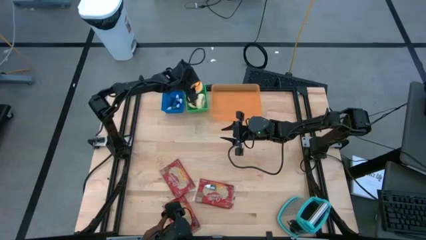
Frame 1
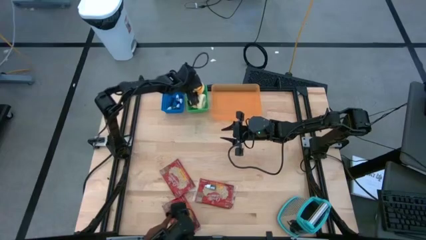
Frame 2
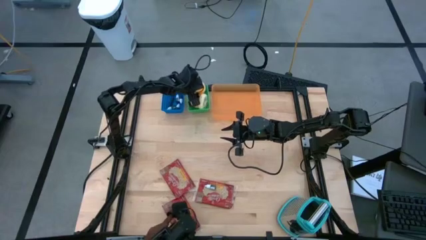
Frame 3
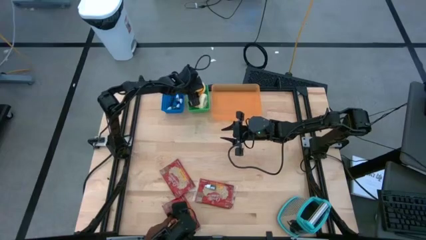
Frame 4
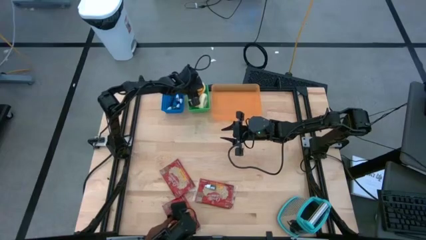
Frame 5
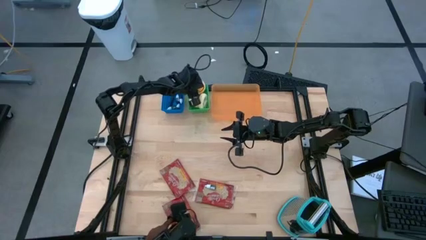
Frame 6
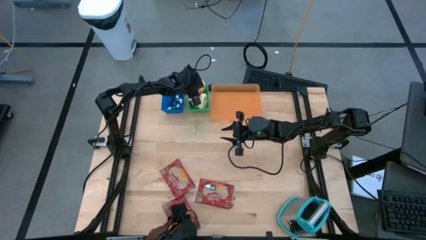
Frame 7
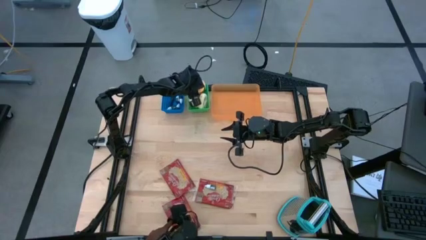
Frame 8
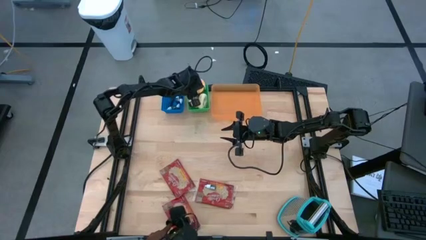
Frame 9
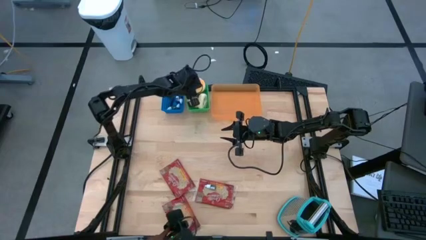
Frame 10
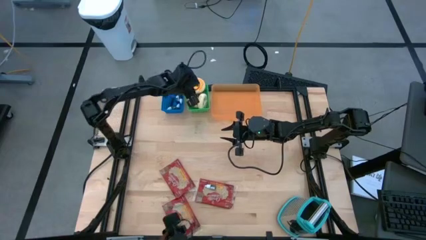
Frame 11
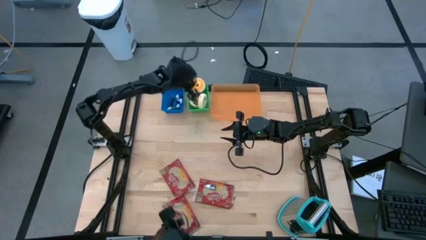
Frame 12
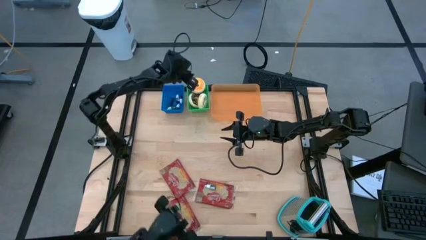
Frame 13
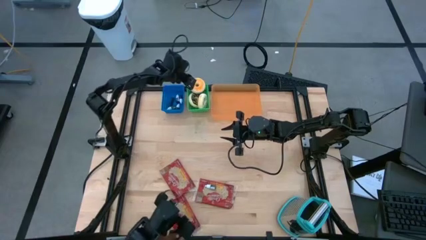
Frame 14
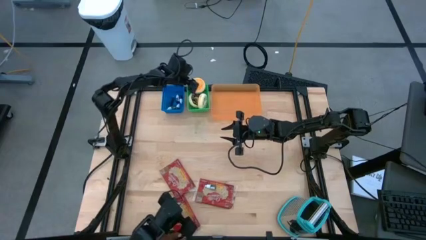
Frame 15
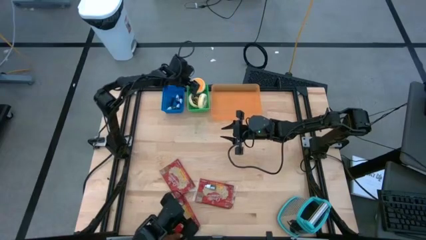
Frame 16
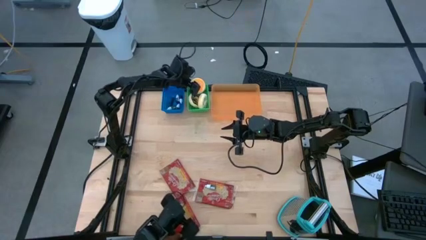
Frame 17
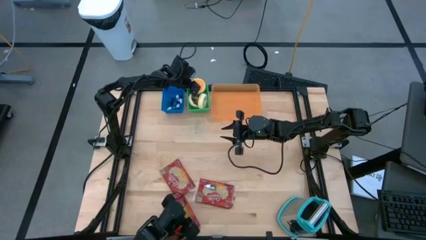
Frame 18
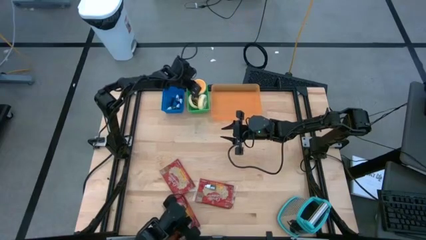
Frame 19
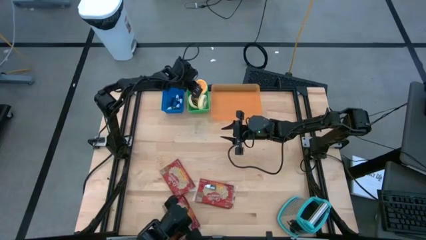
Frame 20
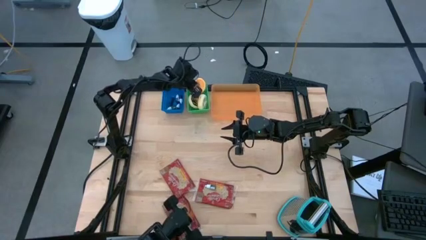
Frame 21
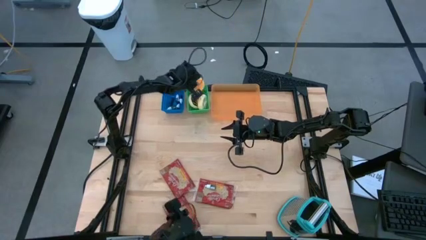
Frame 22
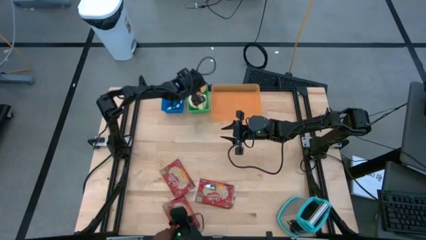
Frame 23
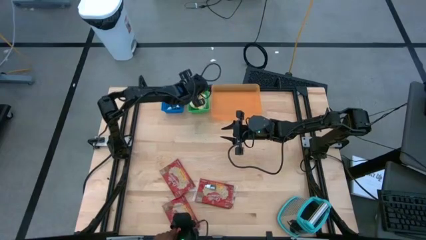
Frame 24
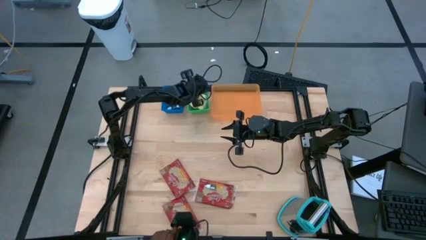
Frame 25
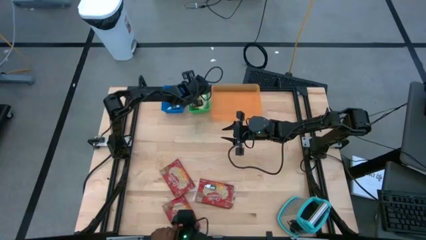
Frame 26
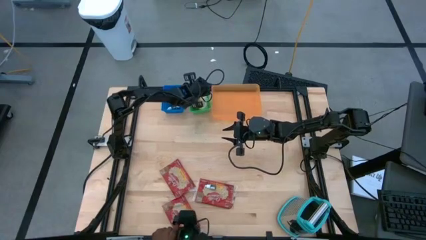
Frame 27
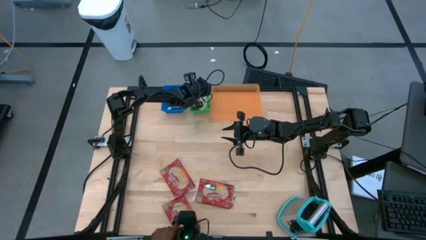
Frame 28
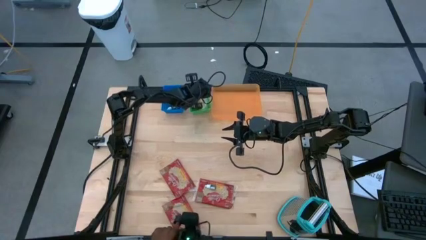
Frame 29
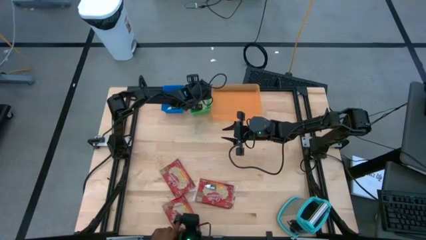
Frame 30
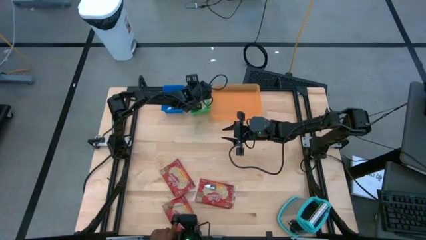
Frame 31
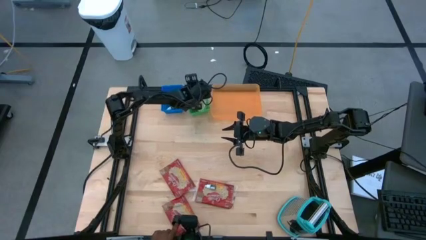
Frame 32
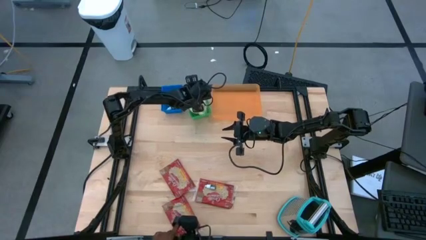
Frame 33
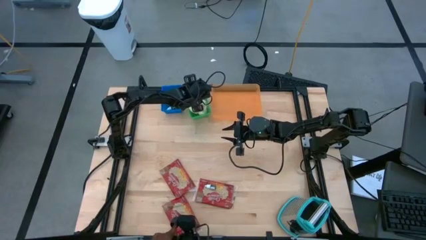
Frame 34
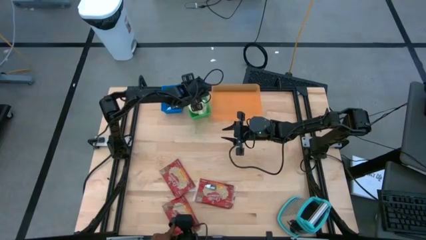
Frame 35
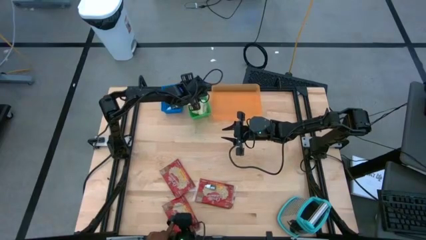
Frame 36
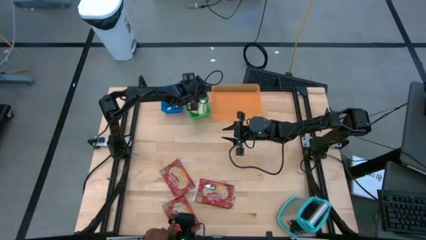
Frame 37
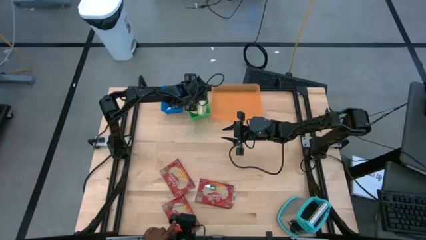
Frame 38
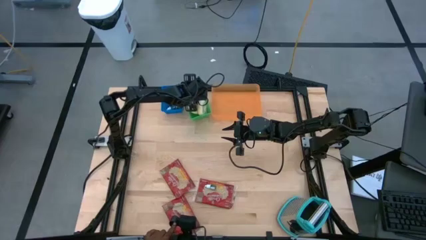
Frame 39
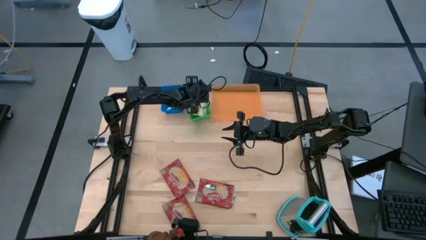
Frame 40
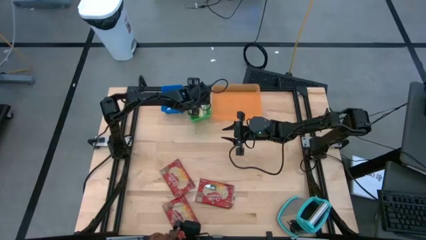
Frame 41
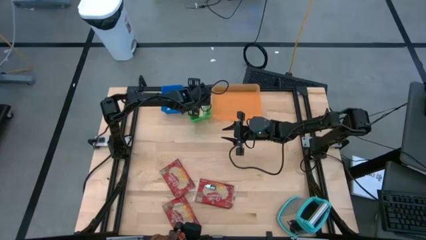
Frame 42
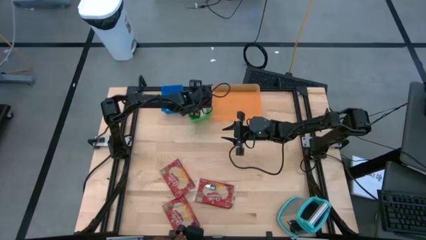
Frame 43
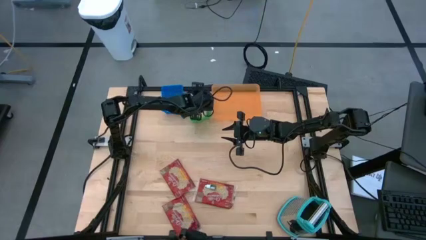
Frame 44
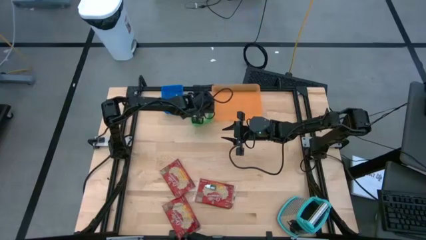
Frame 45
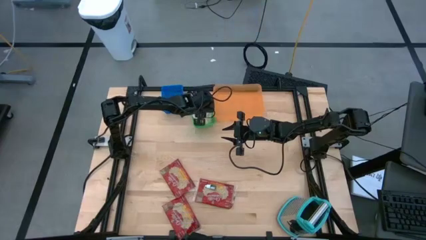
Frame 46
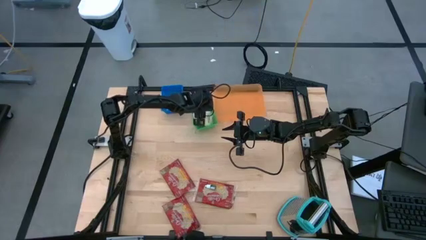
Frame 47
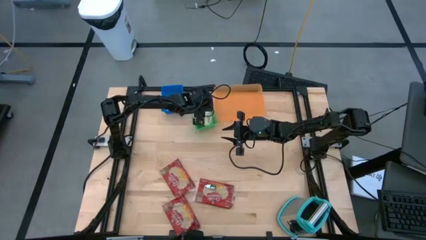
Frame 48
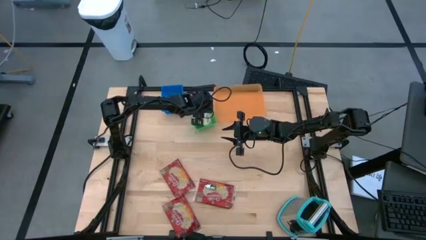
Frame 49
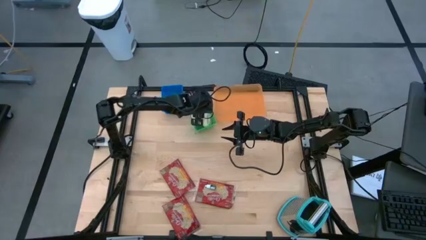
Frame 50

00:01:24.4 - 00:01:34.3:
Put the blue donut into the green bin

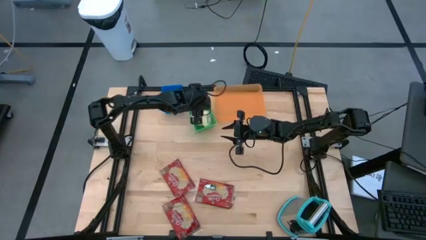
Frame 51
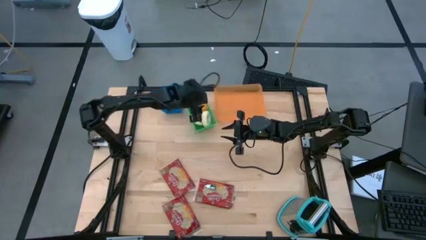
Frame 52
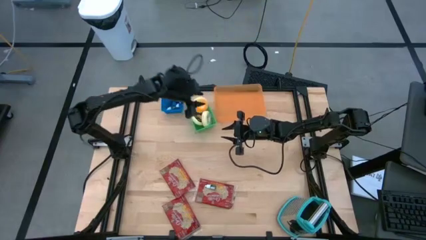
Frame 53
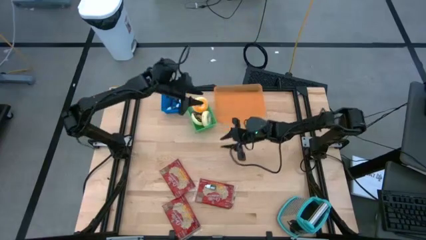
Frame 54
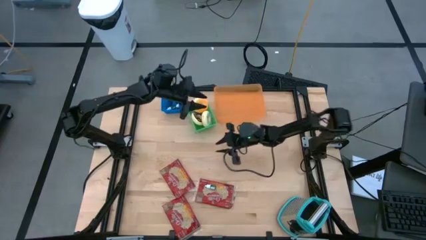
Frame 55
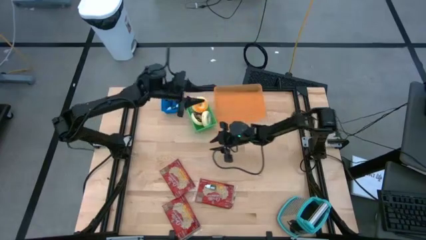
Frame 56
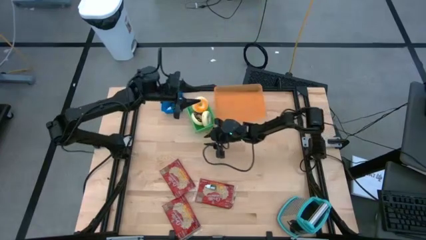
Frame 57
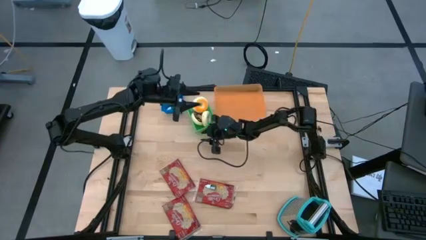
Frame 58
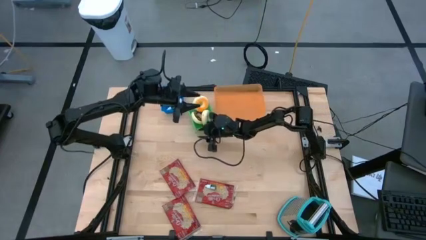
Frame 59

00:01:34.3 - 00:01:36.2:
Adjust the green bin

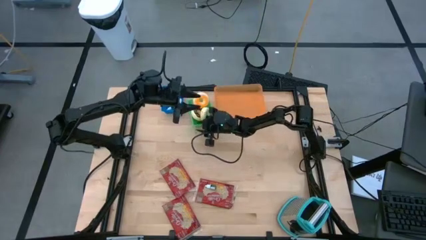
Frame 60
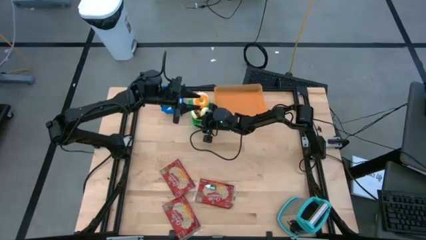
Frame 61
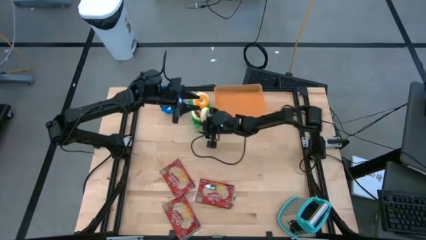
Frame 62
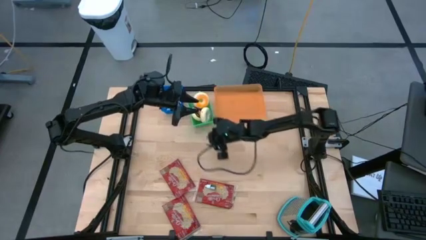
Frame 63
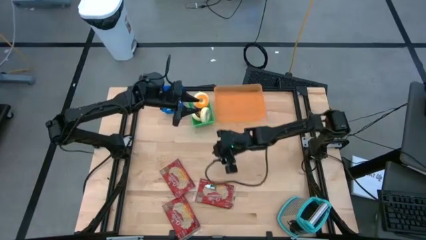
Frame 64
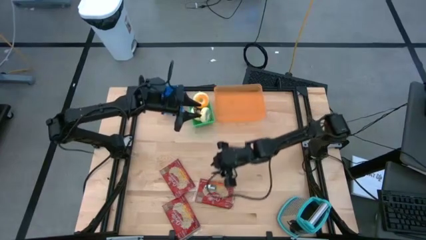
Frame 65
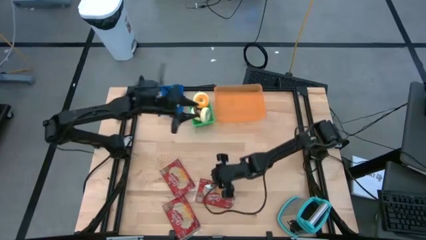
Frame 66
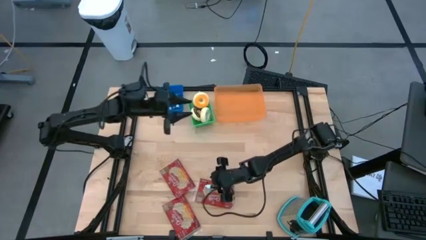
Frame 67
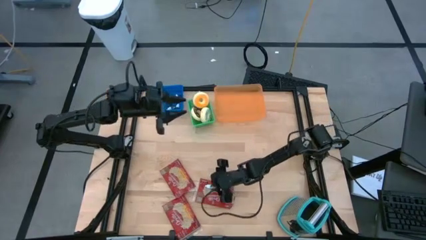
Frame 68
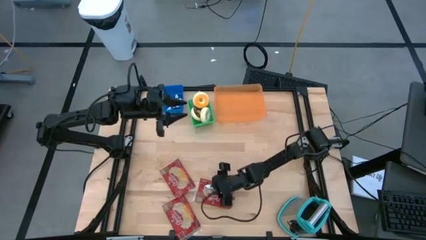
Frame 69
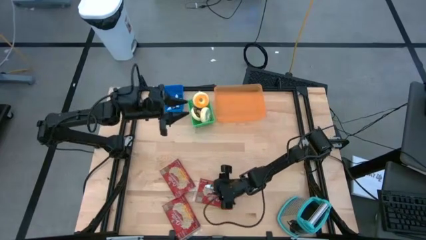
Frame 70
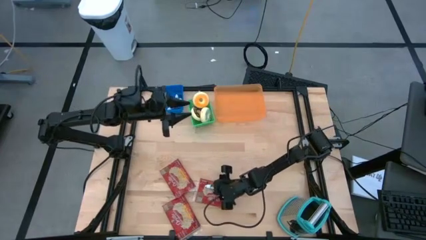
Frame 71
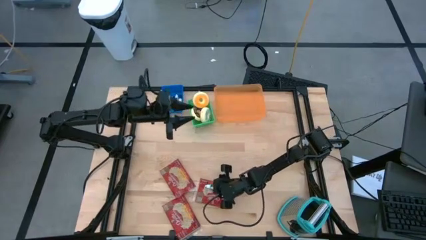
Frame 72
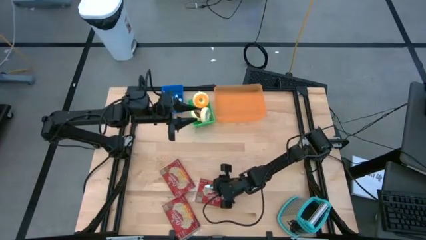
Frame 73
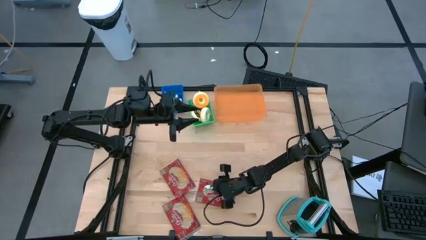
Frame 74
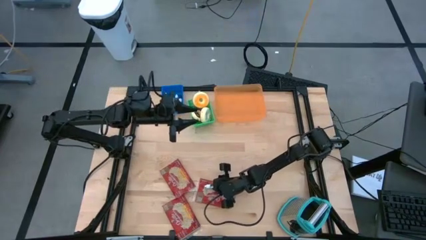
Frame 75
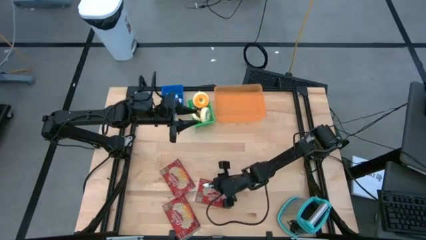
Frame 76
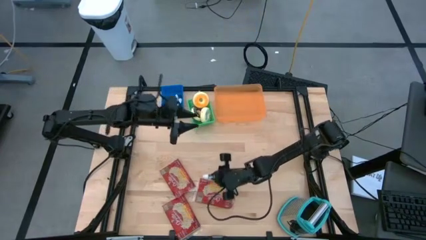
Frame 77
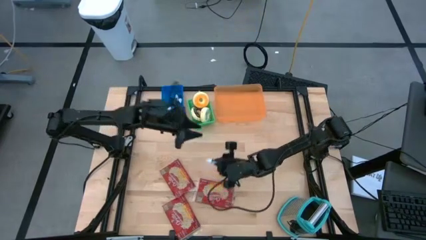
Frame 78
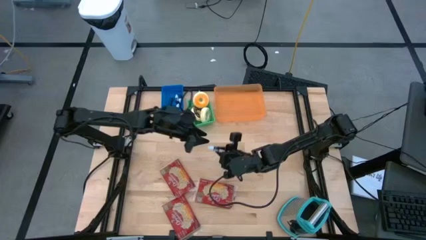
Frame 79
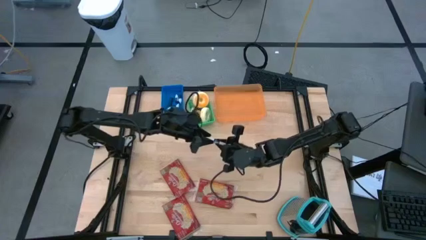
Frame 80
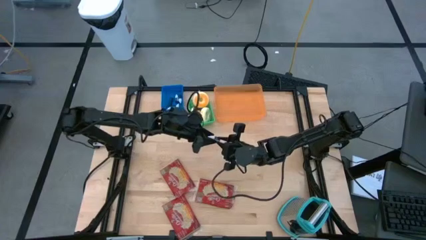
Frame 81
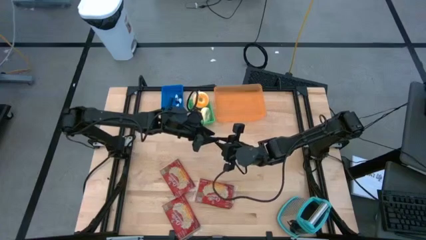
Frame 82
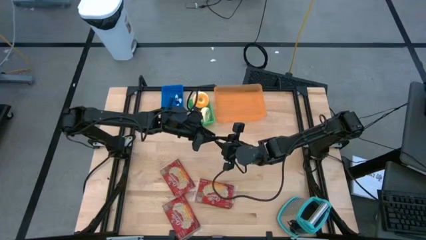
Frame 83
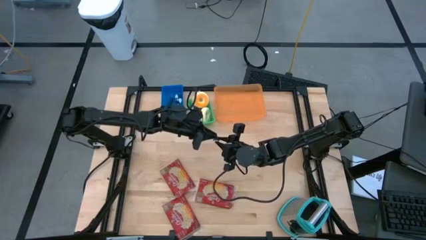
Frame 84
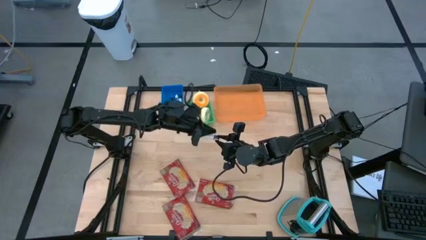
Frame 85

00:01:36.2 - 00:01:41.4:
Put the dark green food coloring bottle into the blue bin
